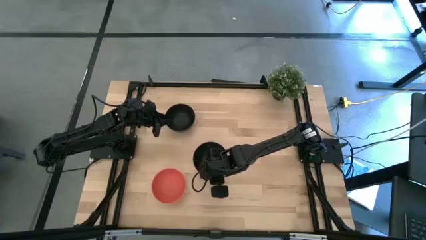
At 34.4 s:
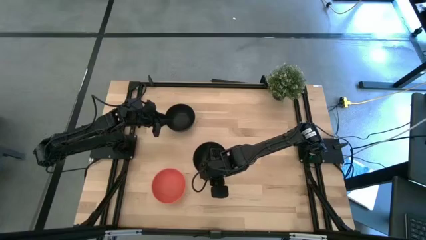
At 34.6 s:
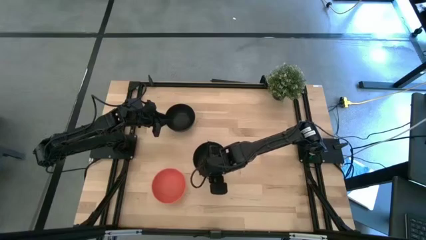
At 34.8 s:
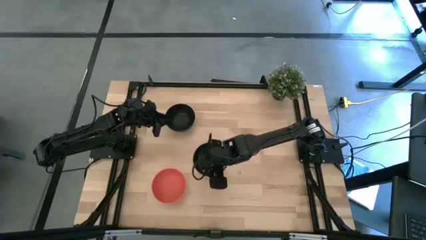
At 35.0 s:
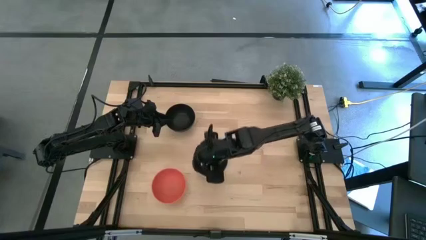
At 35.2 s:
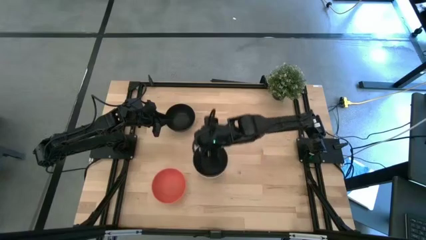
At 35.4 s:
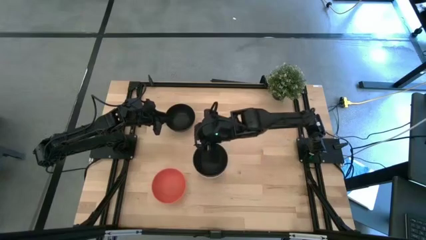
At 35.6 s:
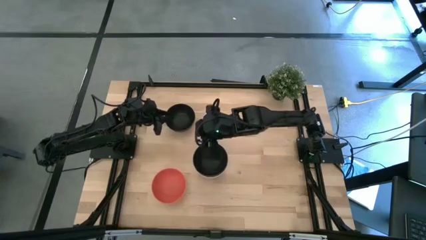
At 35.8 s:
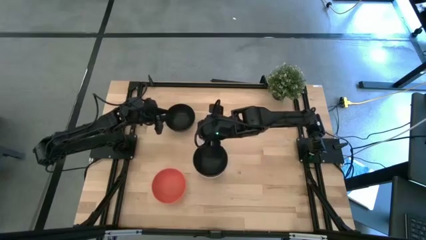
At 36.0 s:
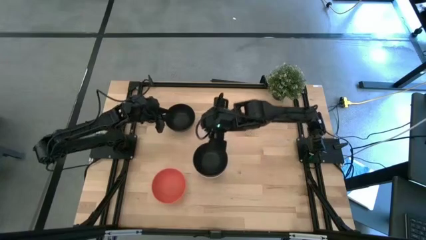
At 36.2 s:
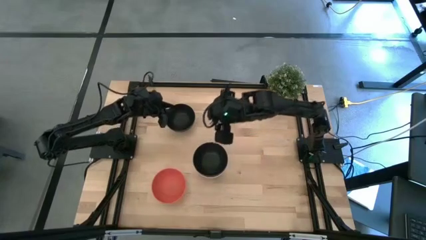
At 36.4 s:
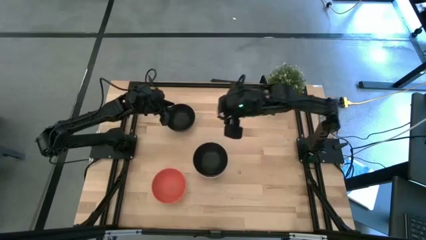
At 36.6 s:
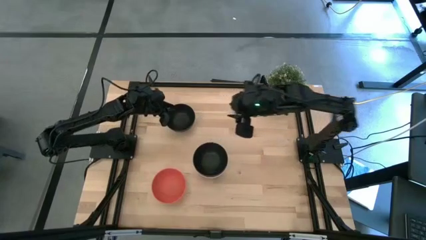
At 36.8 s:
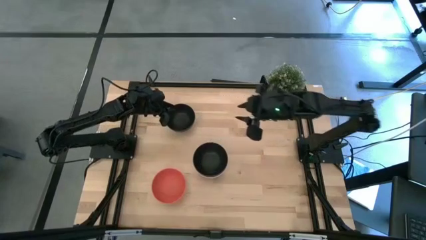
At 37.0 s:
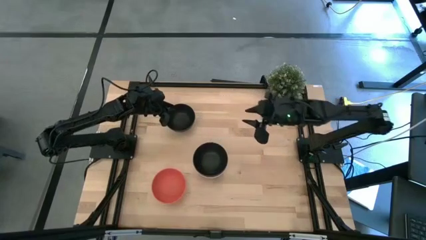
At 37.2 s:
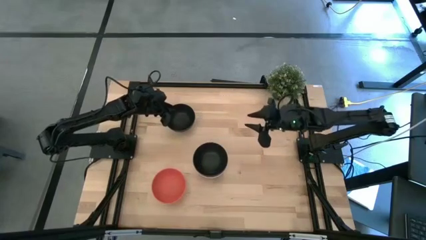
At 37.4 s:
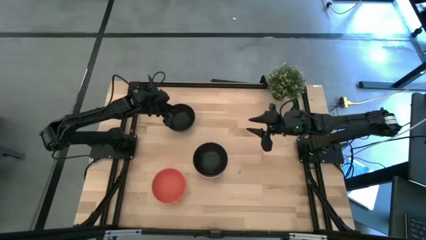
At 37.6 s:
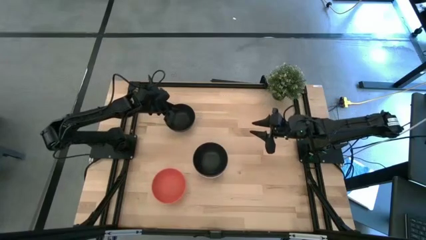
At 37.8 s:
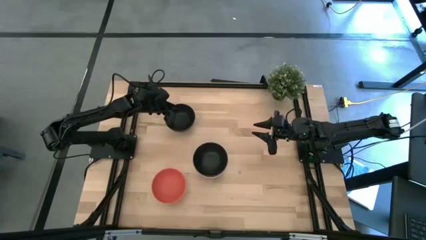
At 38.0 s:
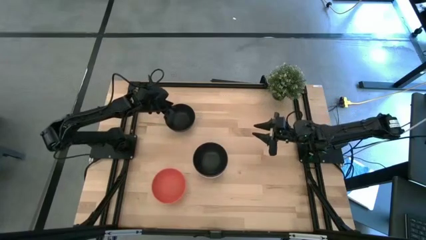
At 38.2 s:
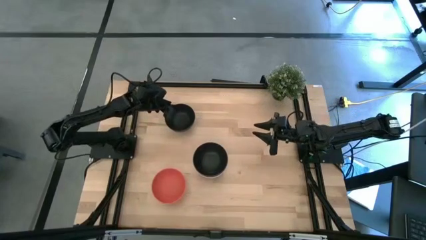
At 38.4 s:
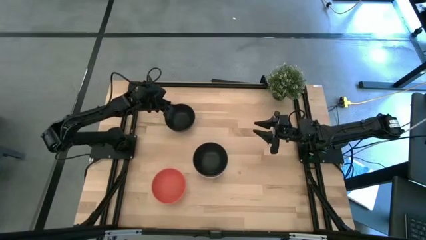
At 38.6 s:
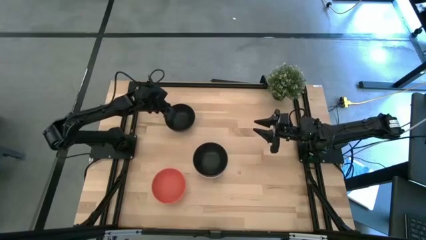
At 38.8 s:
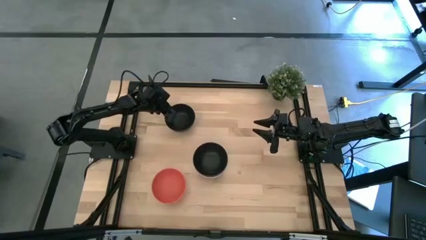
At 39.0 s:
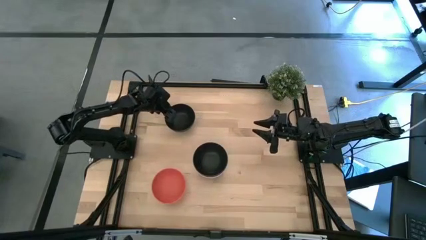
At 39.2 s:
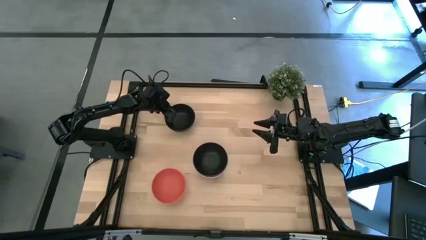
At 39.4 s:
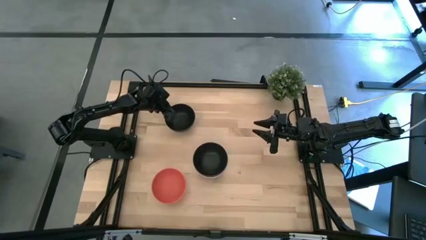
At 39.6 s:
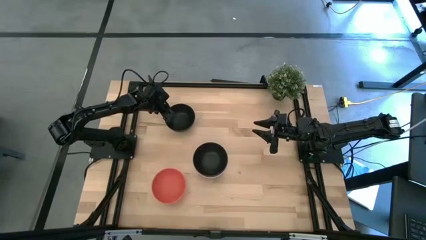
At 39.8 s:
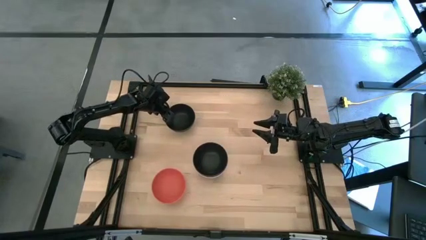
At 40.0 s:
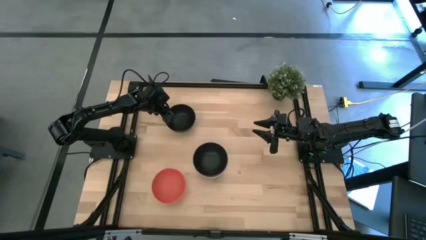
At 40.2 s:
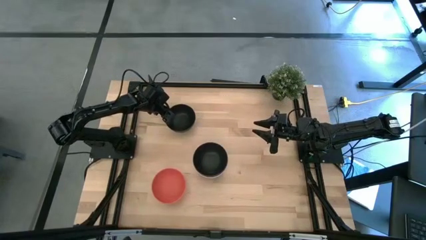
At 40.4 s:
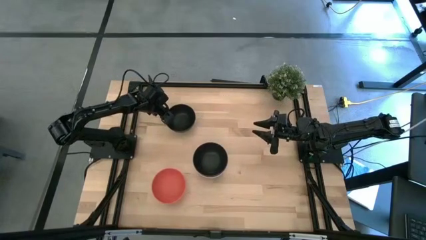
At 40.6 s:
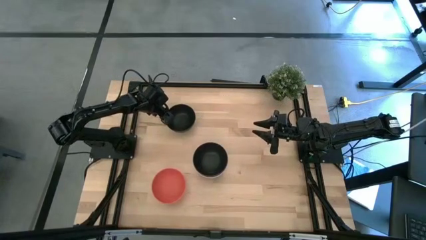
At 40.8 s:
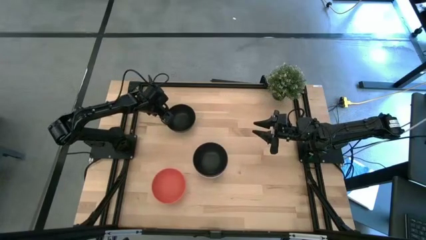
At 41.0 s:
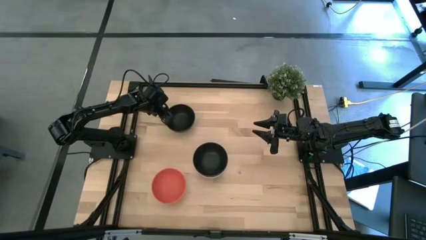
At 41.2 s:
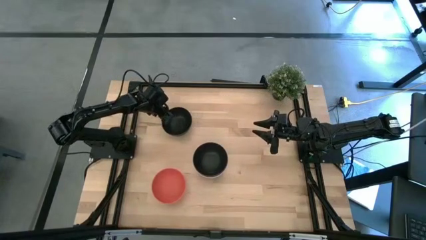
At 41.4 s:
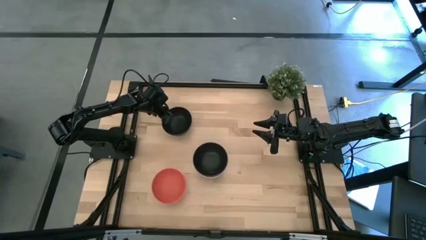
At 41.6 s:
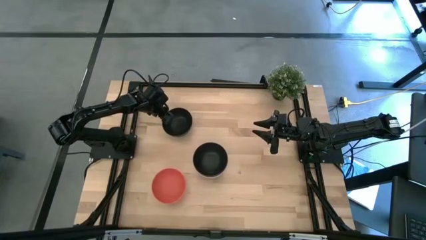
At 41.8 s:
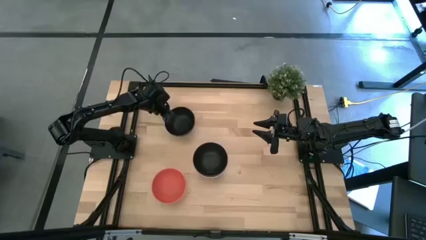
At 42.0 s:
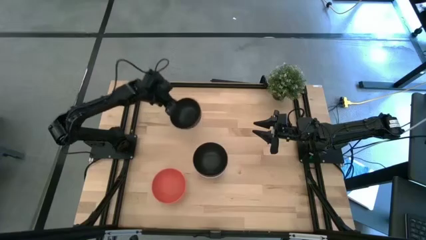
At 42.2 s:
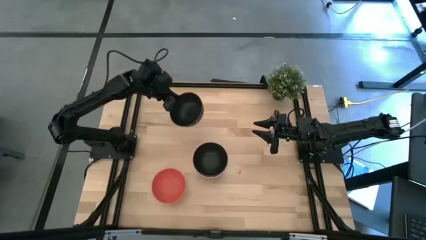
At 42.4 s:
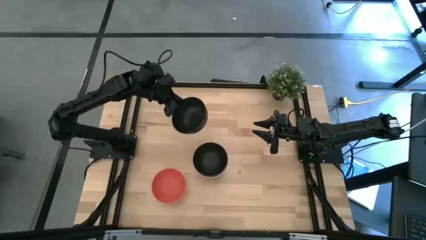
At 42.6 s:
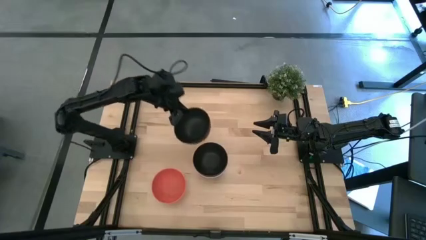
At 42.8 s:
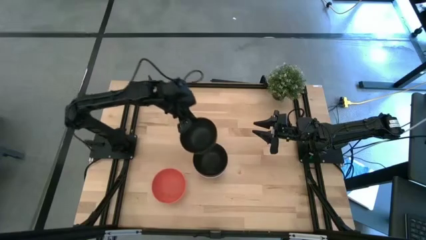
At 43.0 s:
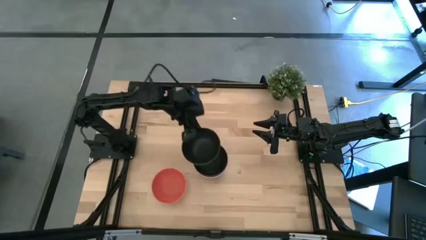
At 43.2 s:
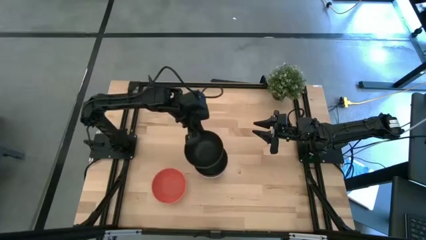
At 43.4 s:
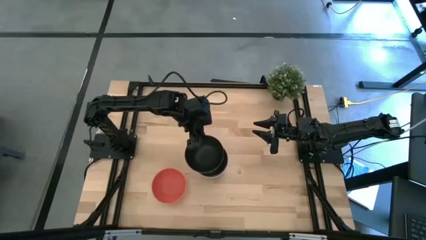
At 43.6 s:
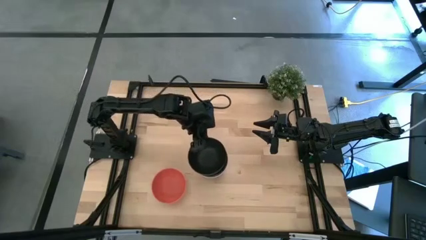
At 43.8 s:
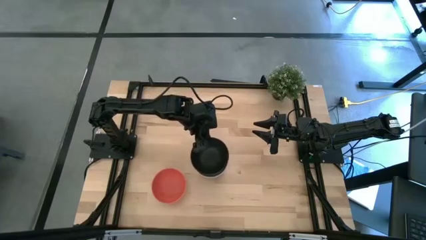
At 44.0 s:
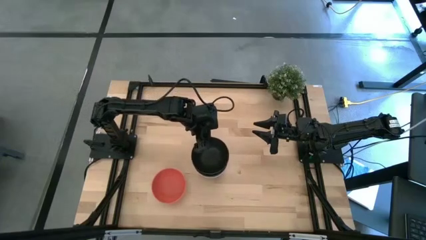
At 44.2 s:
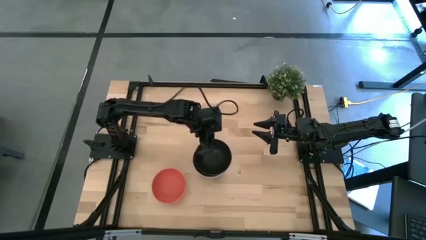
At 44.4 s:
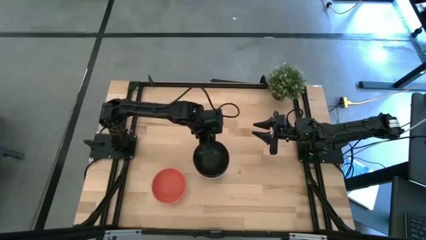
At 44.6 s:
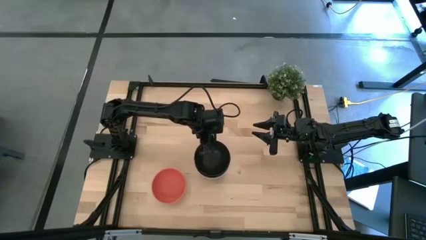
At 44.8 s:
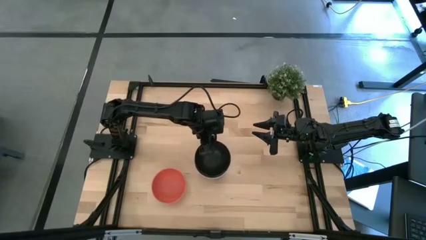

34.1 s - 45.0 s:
Task: Nest bowls inside each other
Stack the black bowl on top of the black bowl
